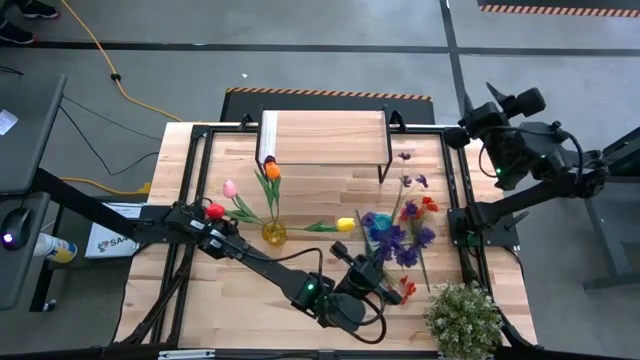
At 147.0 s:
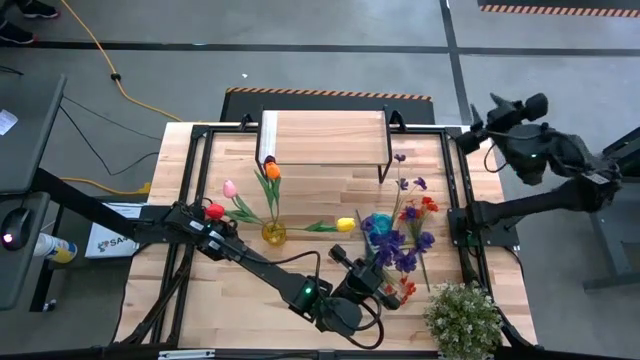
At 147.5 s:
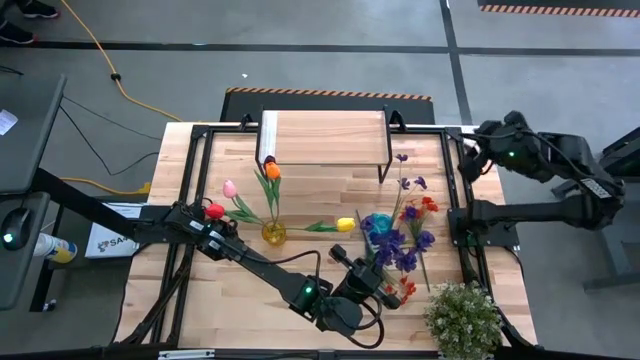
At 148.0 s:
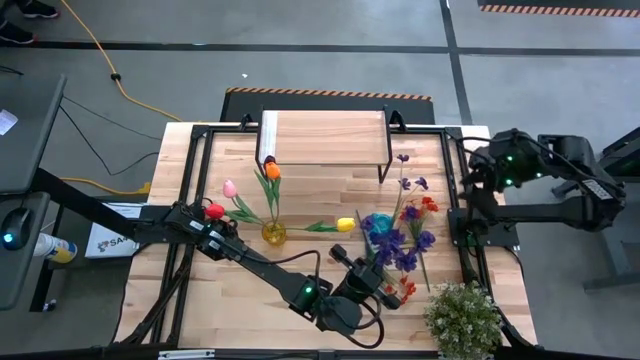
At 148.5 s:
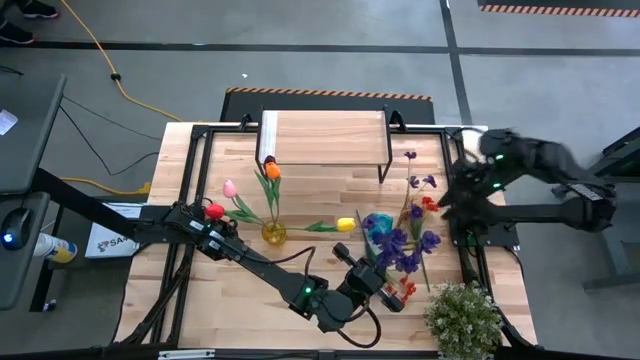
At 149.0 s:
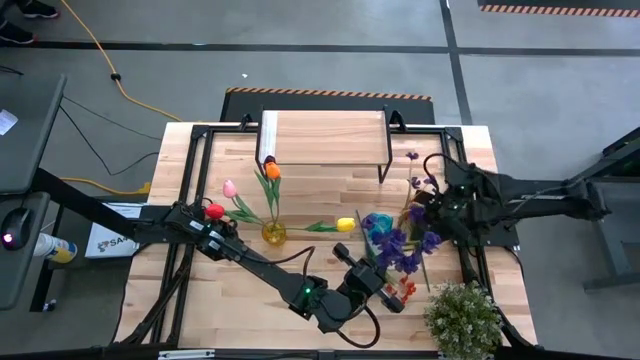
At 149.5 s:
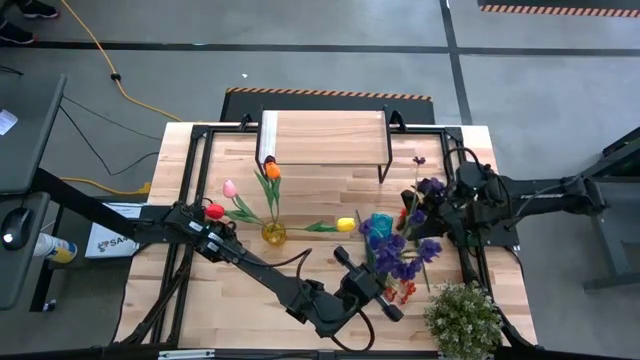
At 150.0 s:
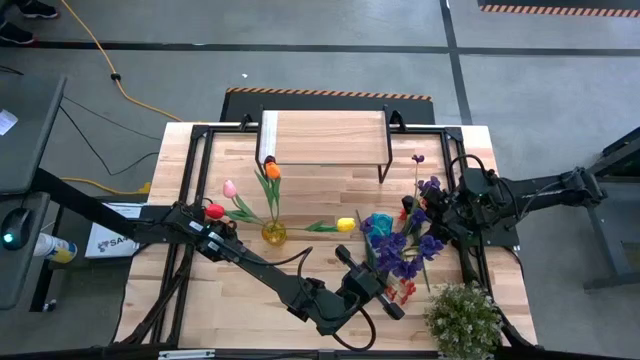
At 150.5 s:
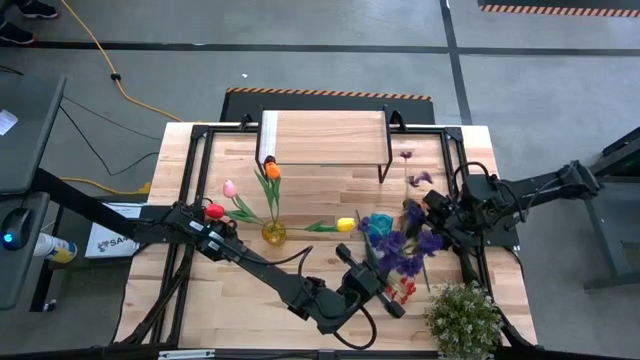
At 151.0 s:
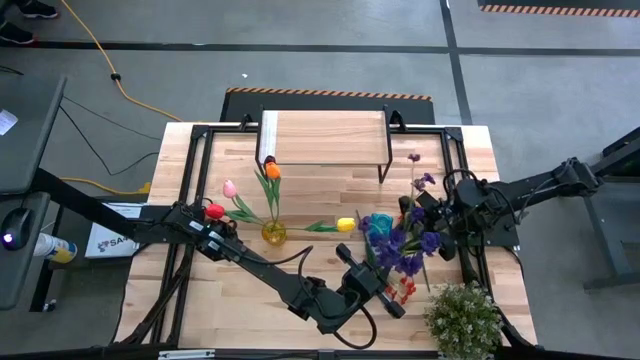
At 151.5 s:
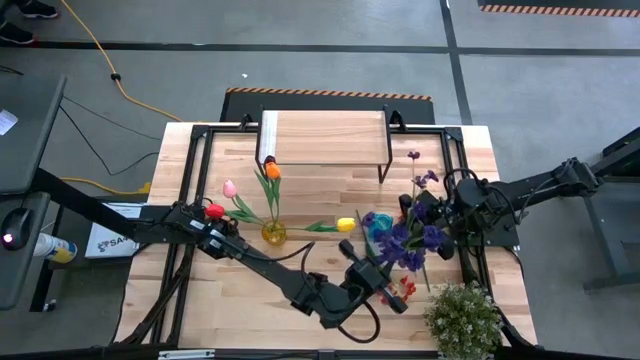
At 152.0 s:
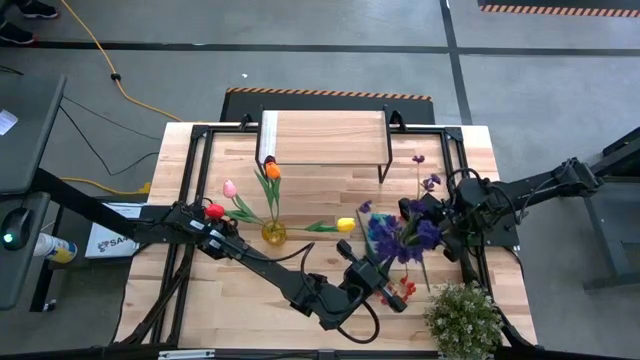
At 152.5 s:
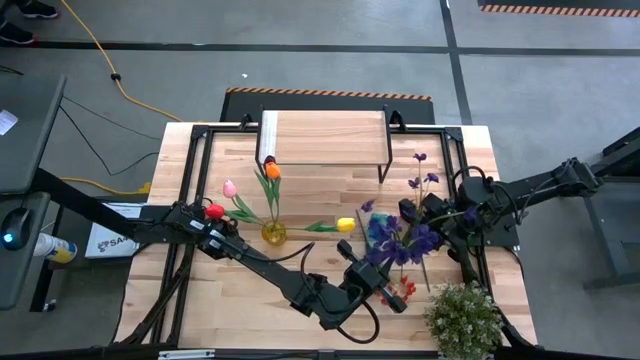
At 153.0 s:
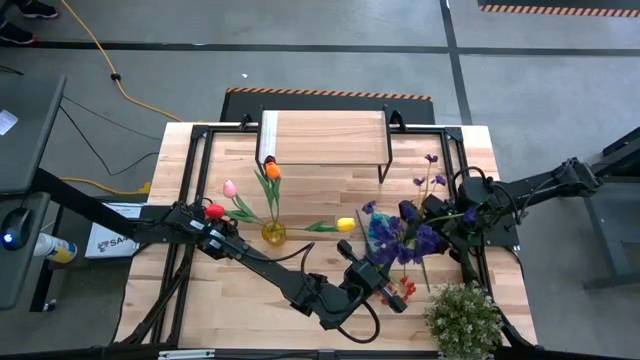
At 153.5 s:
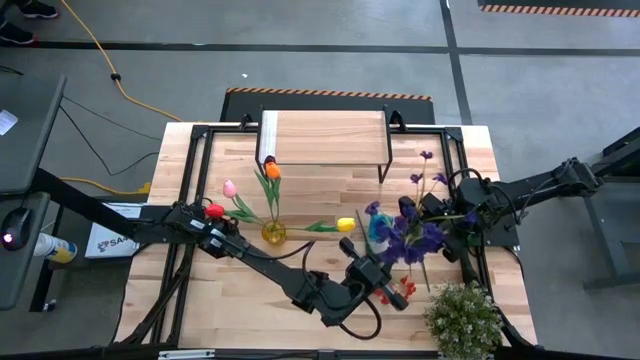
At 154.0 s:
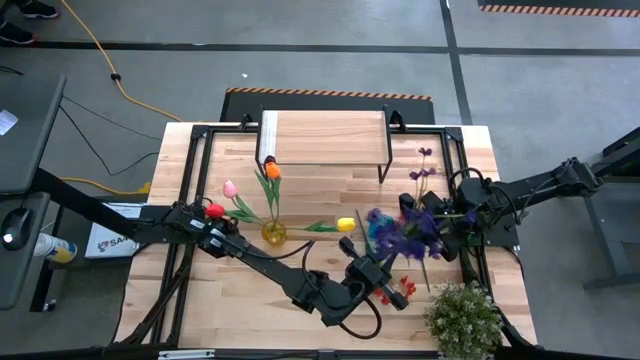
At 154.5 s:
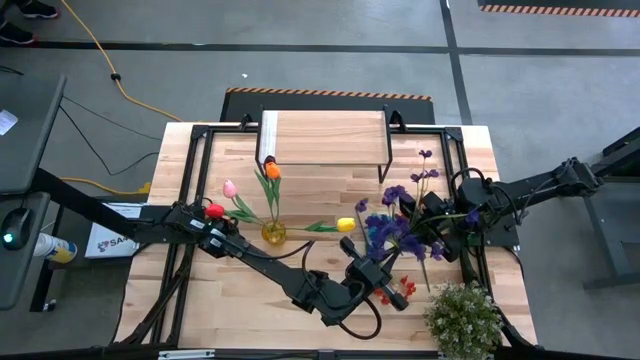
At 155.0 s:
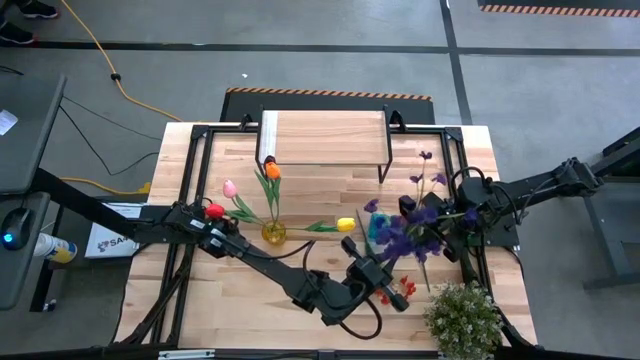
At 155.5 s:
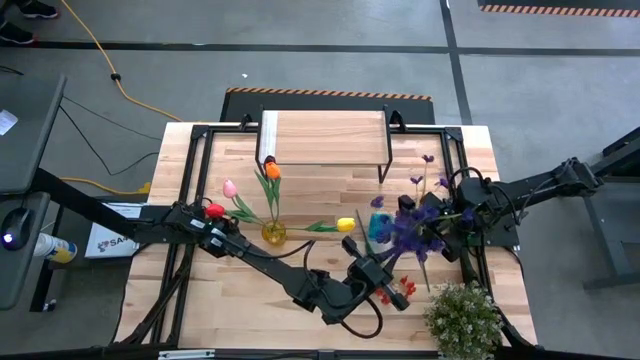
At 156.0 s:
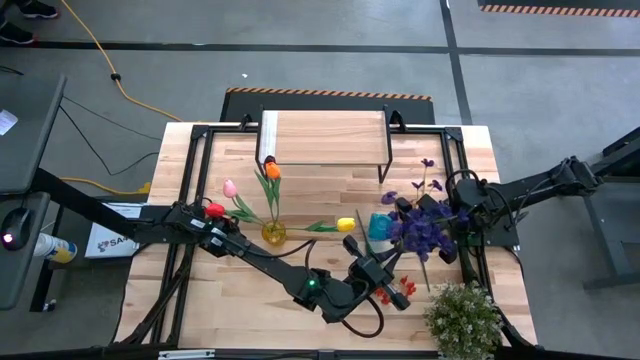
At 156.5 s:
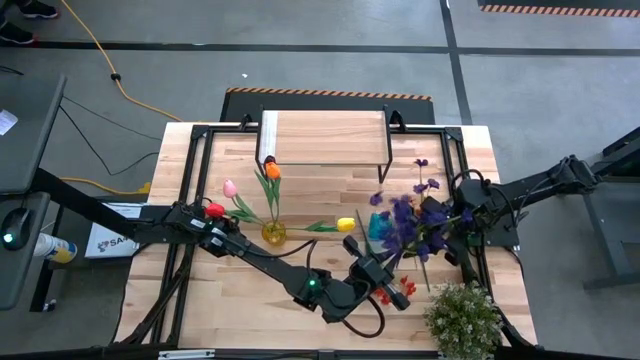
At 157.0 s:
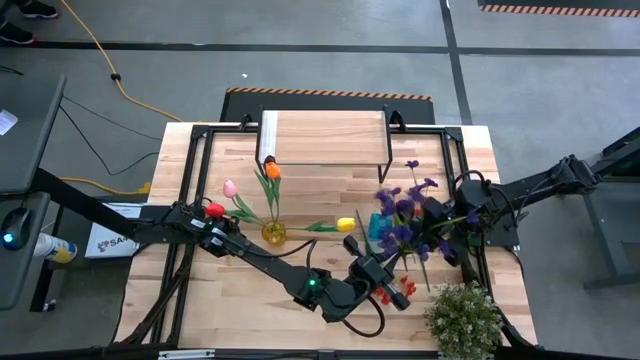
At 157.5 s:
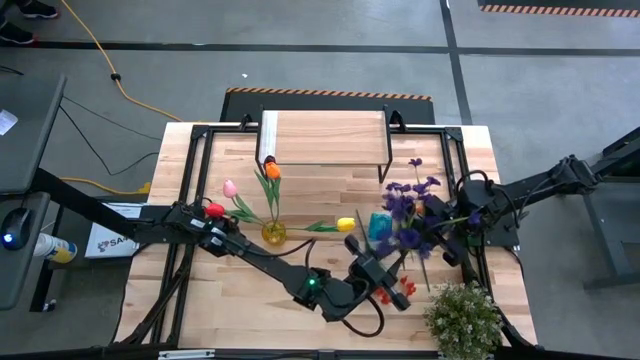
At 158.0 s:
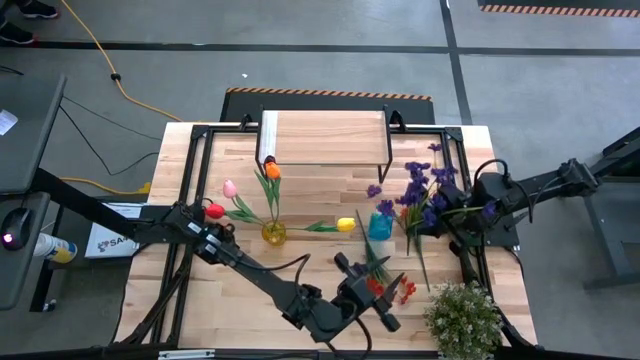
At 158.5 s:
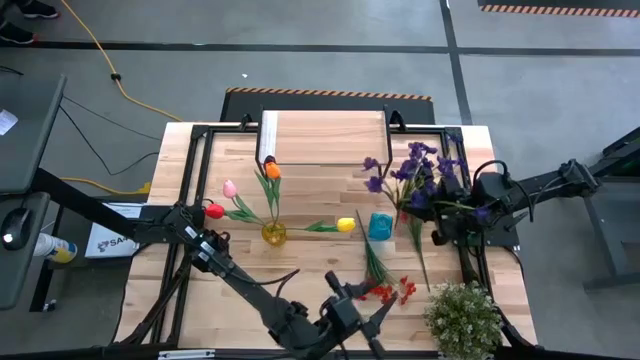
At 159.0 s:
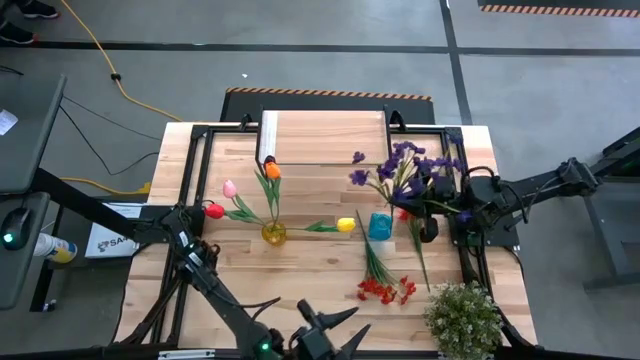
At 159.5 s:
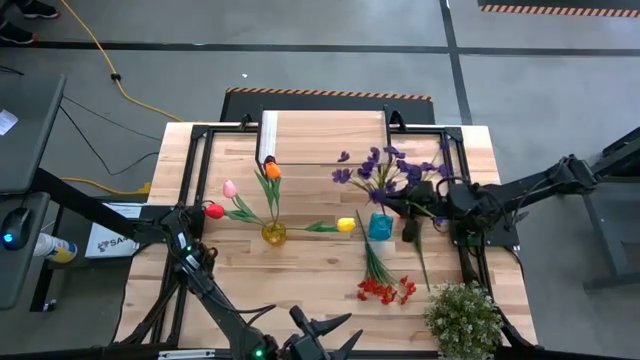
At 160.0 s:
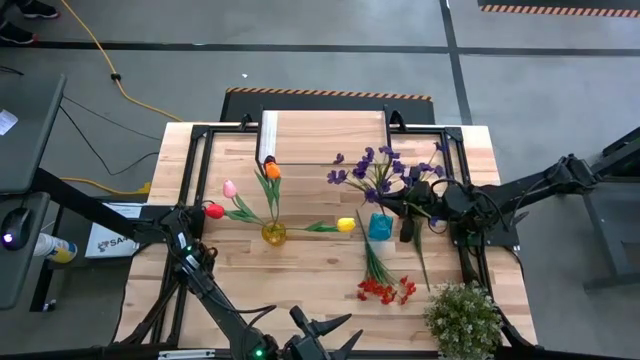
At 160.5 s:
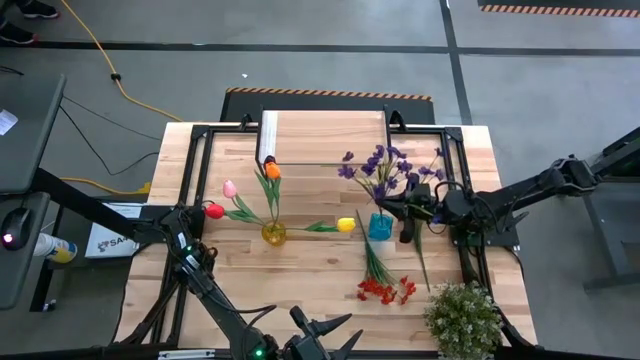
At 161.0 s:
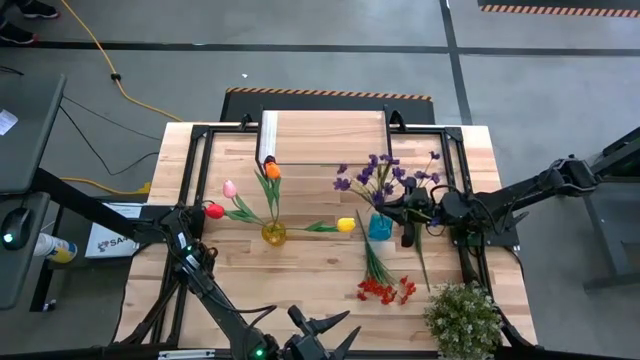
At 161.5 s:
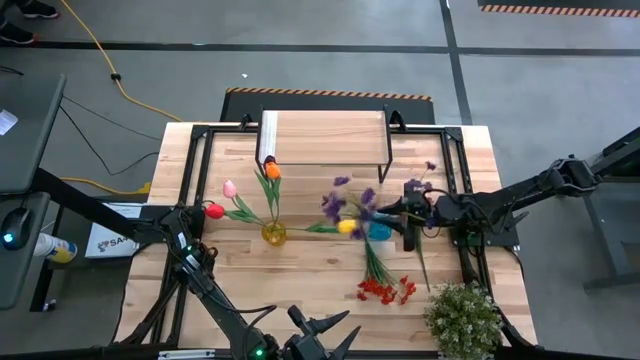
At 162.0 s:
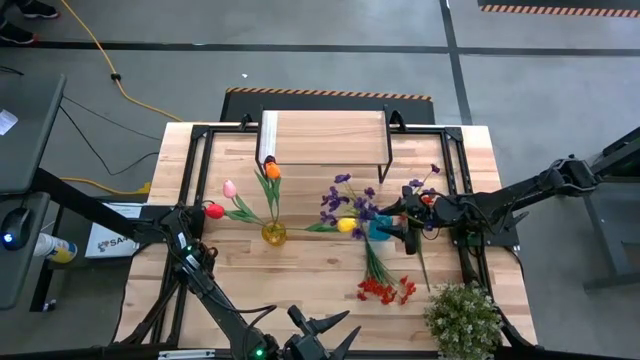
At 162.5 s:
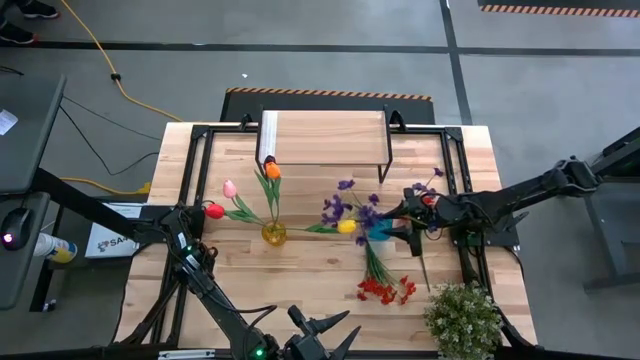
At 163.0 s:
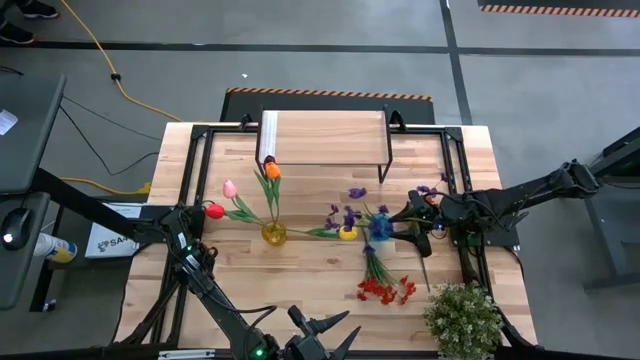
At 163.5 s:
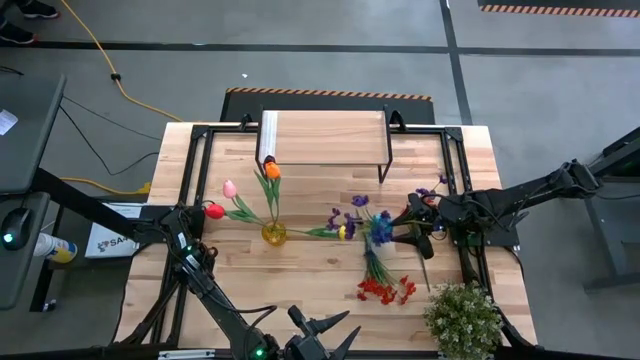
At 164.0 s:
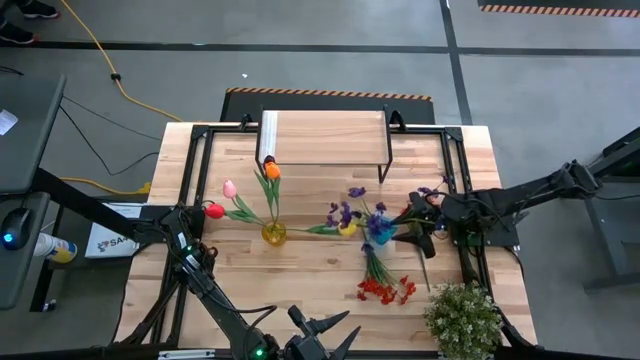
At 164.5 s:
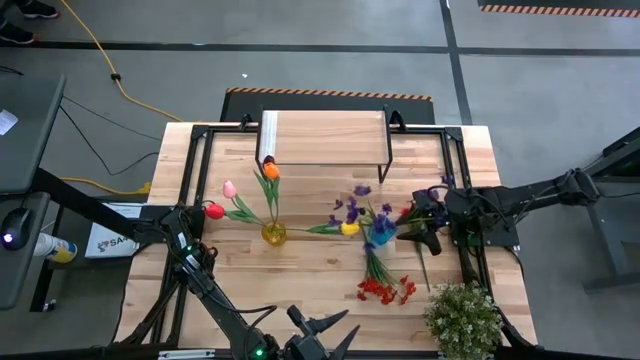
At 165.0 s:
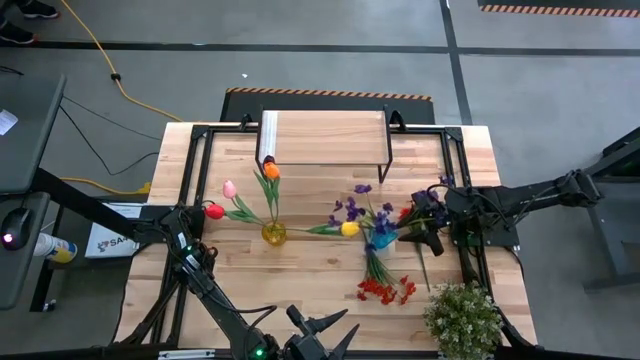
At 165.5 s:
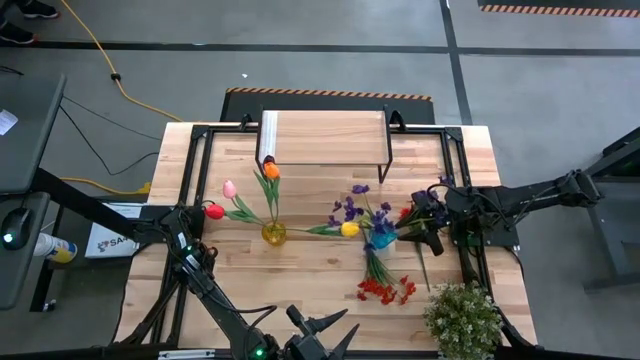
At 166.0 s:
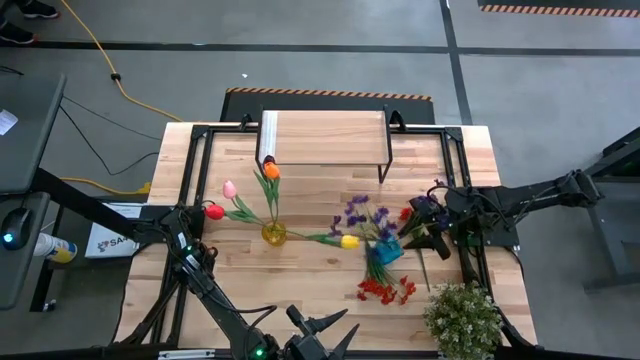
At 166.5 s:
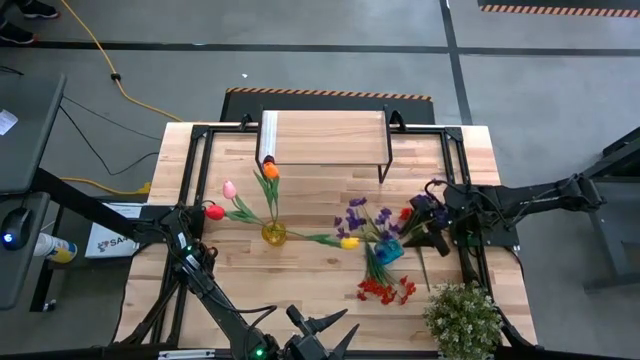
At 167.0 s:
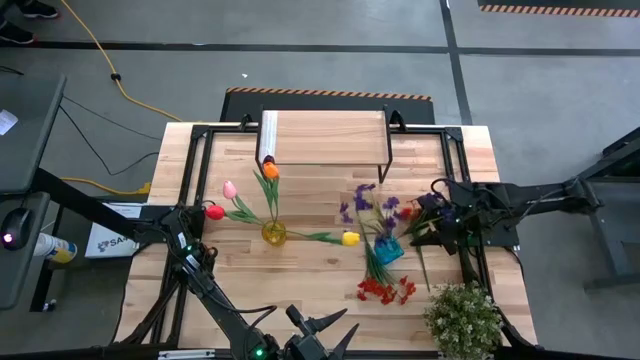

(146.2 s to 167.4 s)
Task: Pick and place flowers into a vace then onto a shelf
Put the purple flowers into the blue vase
